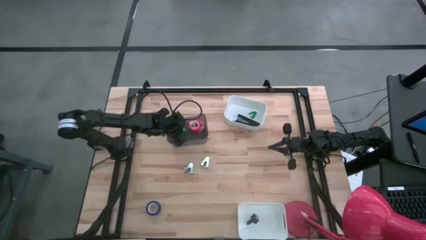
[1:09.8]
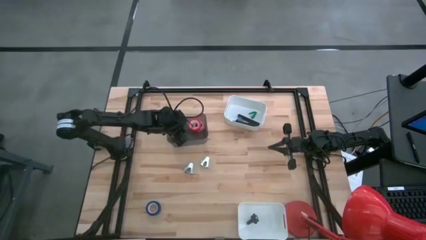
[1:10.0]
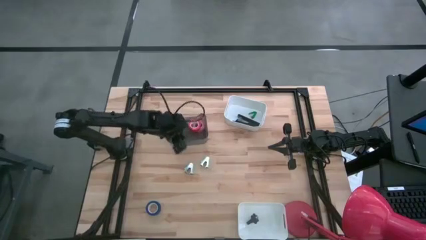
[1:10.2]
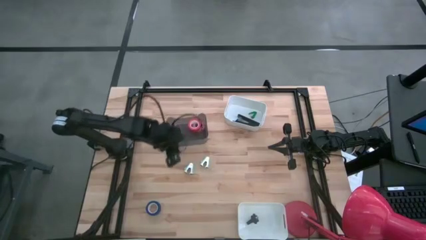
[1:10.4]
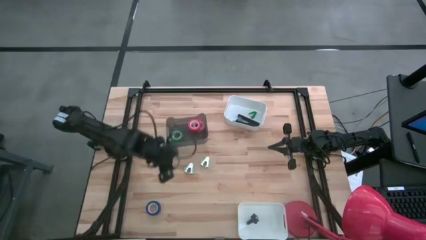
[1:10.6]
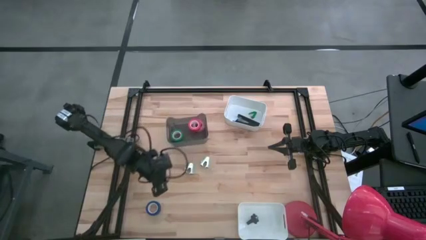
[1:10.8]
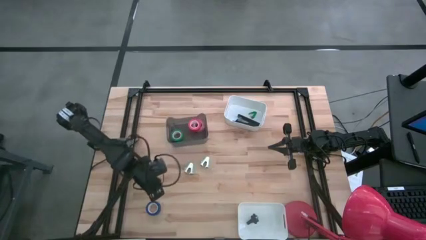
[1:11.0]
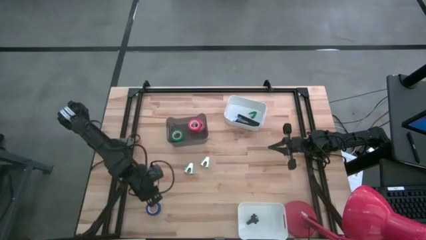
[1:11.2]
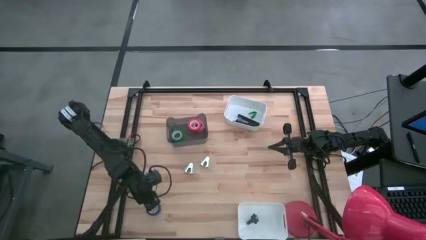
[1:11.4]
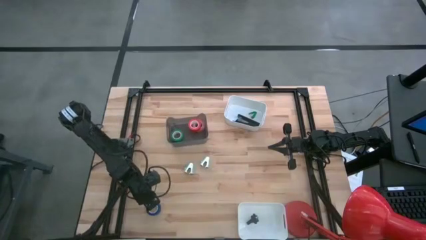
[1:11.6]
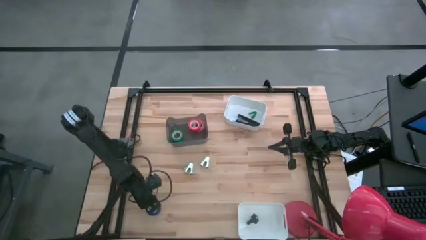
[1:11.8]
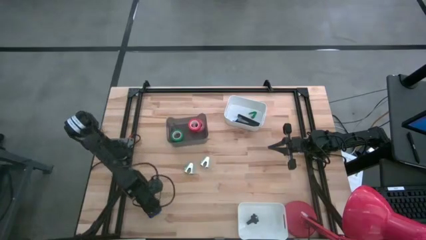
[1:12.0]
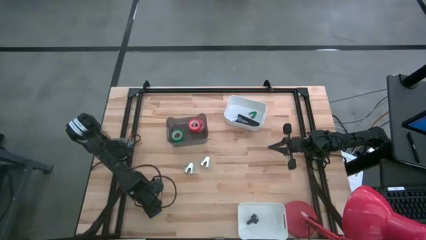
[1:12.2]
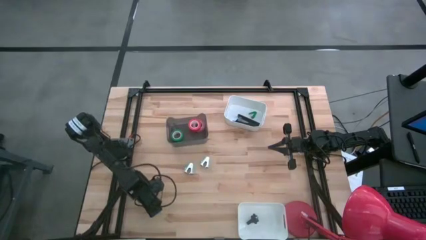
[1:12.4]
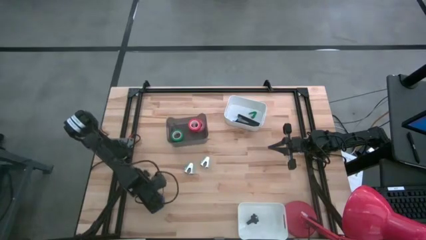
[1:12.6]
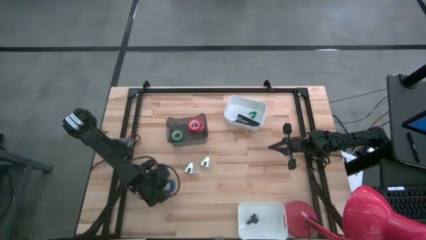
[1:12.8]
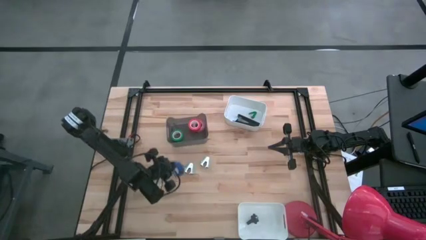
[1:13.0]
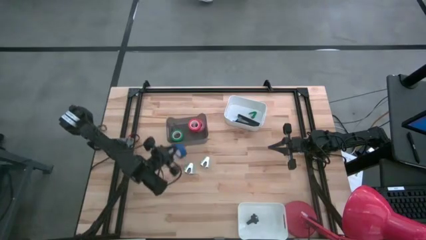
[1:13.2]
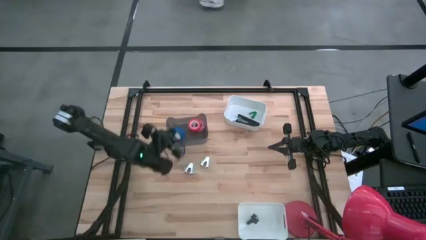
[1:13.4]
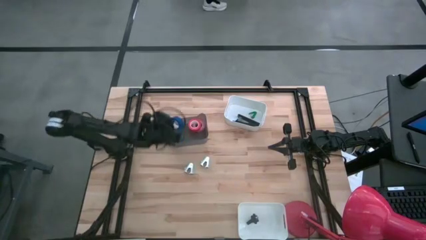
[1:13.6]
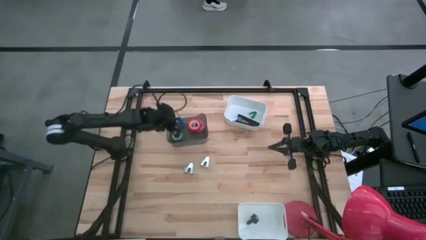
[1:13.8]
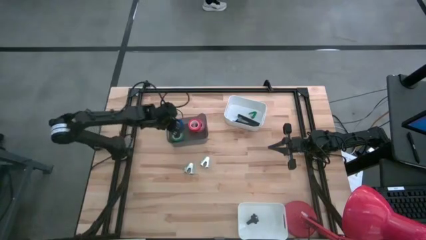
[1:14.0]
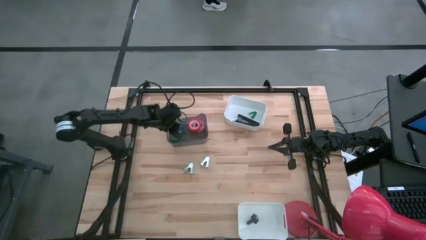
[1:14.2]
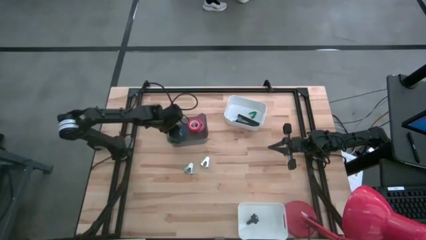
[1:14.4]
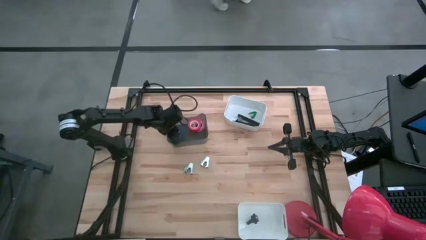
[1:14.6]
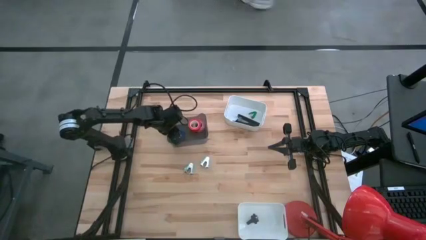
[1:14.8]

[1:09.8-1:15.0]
Task: Pick and place Stapler, Stapler remover, tape
Put the blue tape into the black bin

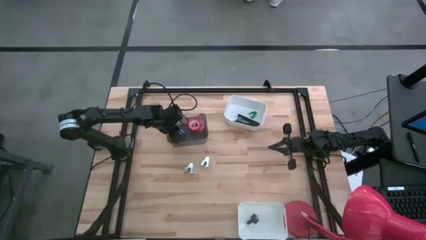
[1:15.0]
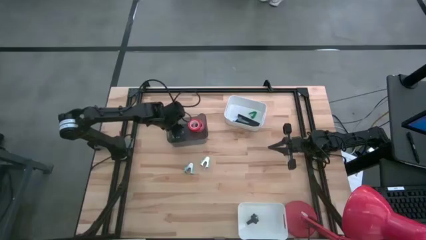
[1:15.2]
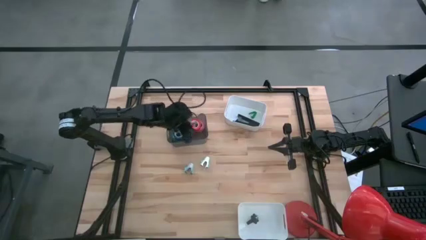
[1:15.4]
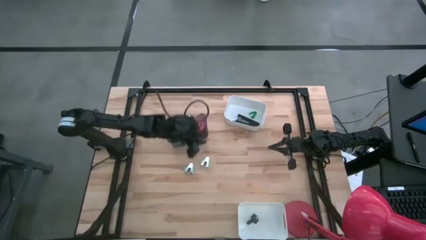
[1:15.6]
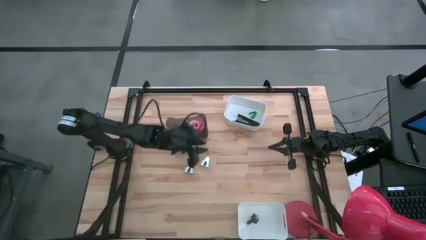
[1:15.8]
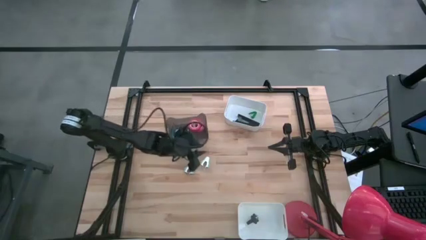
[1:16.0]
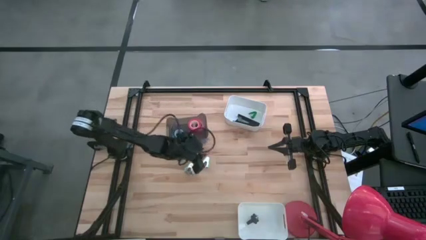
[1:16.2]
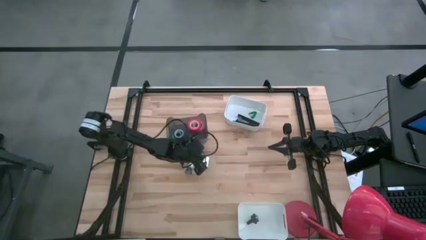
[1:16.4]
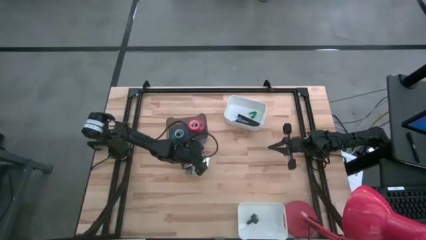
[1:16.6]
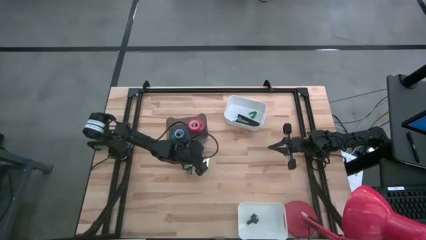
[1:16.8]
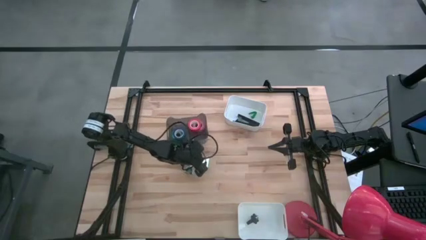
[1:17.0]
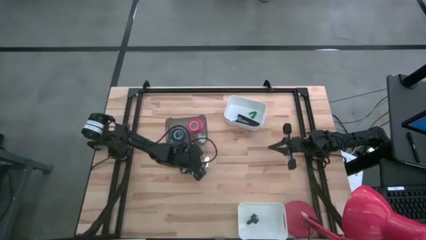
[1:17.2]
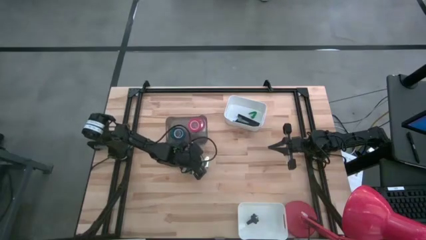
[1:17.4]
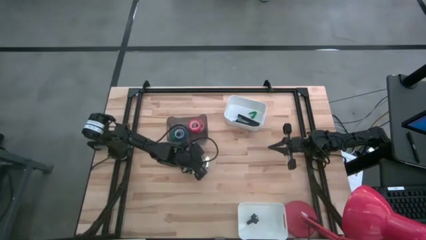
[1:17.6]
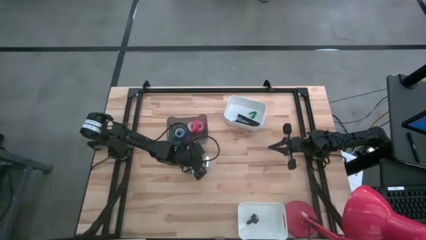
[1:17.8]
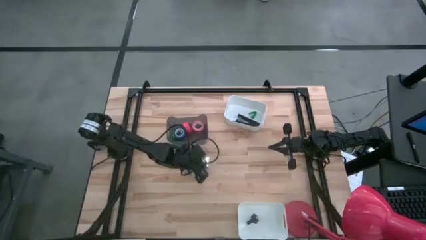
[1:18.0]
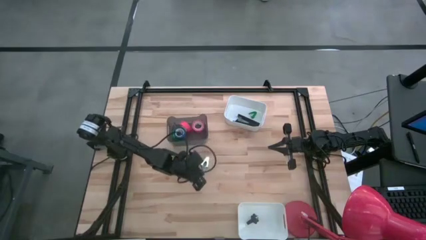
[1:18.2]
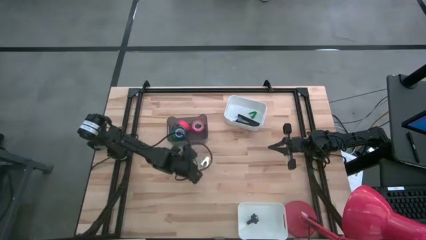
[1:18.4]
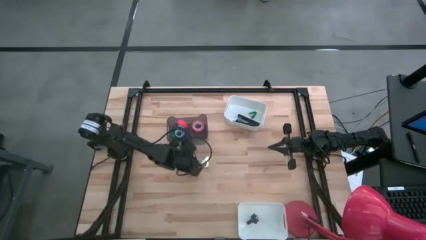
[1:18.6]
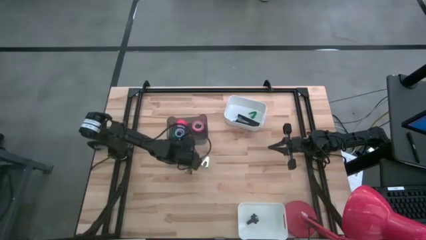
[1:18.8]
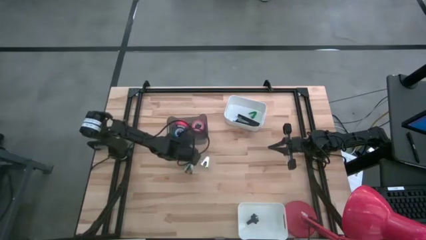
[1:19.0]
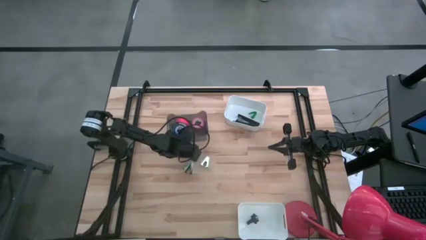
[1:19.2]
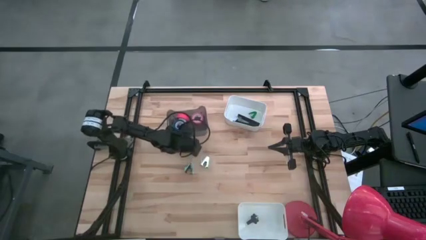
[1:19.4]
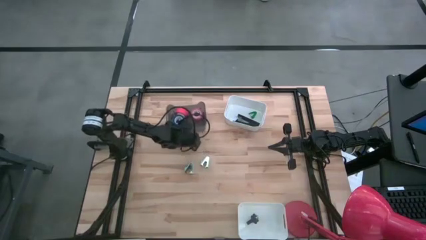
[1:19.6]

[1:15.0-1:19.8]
Adjust the black bin on the table

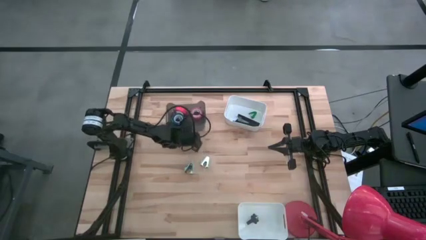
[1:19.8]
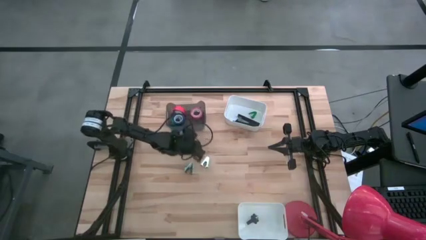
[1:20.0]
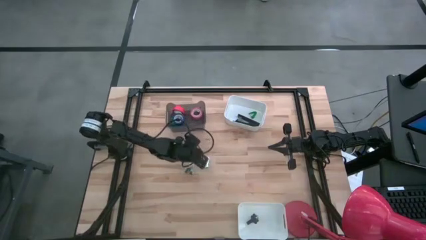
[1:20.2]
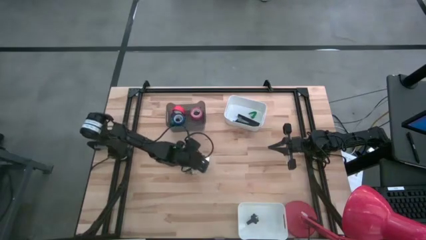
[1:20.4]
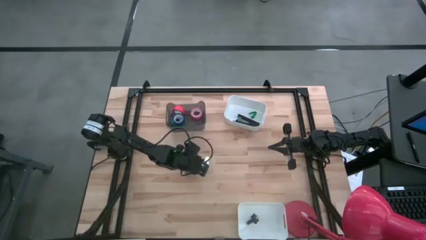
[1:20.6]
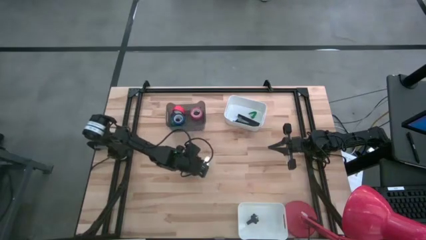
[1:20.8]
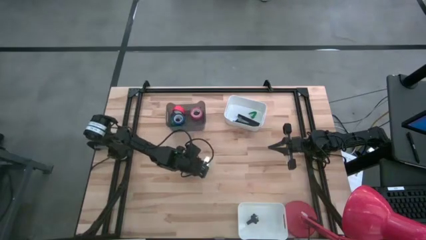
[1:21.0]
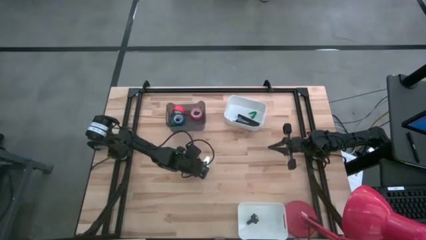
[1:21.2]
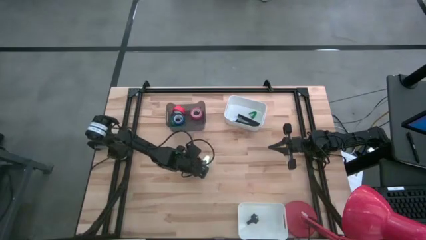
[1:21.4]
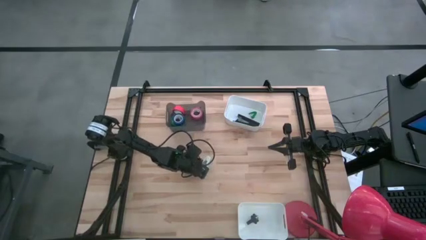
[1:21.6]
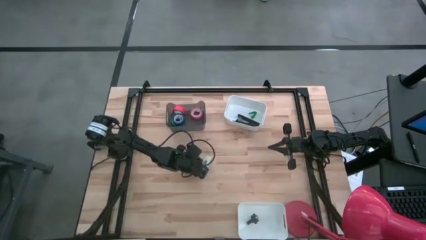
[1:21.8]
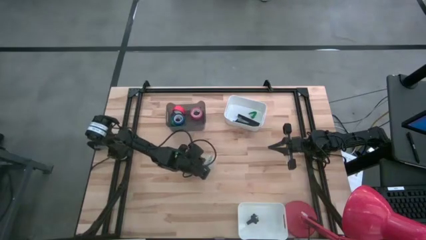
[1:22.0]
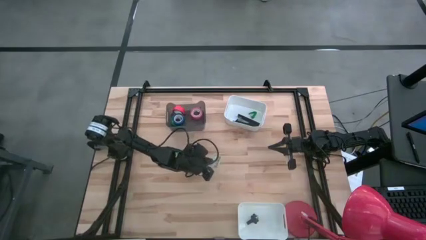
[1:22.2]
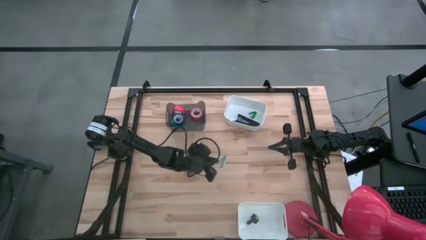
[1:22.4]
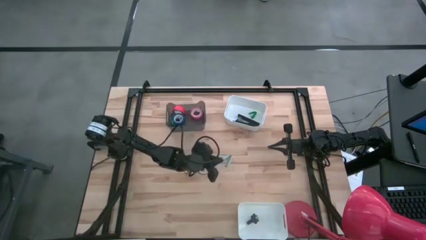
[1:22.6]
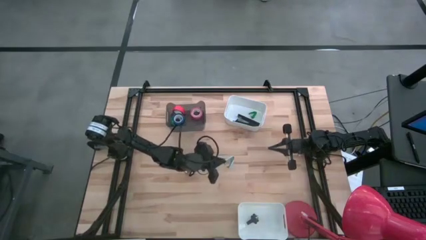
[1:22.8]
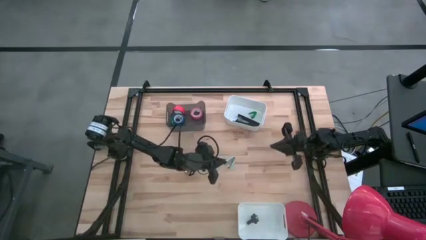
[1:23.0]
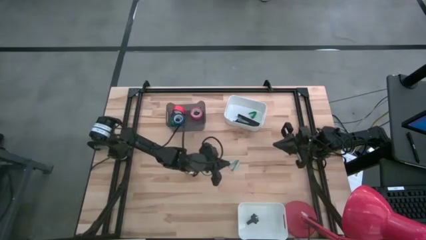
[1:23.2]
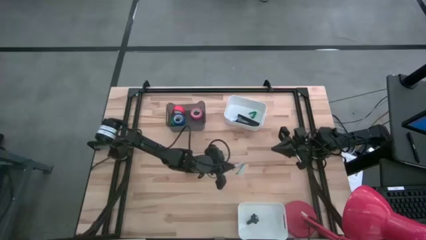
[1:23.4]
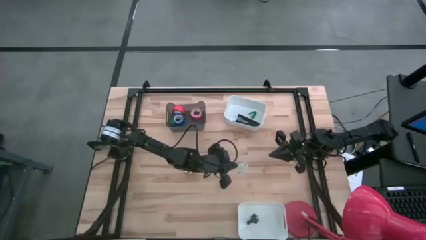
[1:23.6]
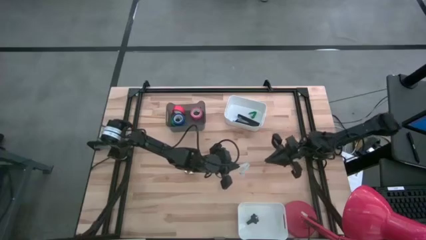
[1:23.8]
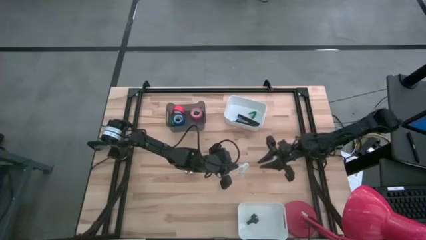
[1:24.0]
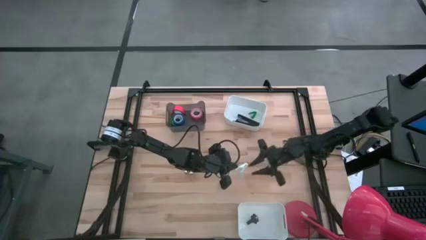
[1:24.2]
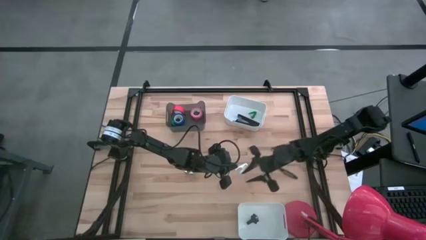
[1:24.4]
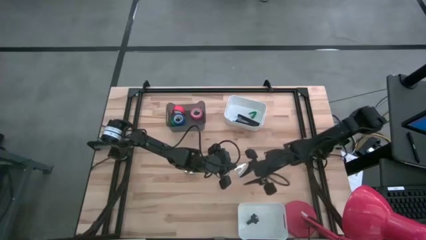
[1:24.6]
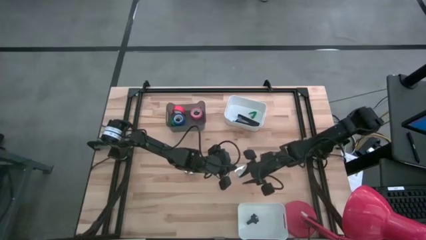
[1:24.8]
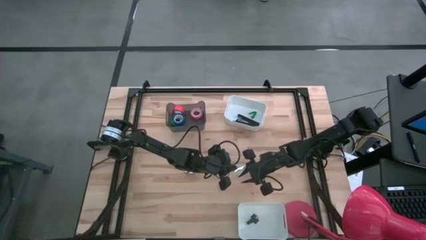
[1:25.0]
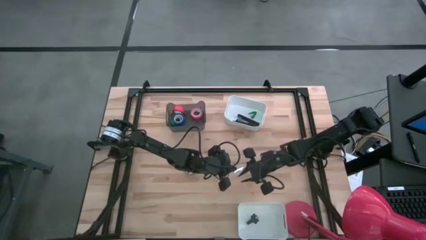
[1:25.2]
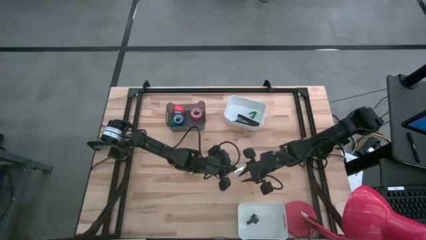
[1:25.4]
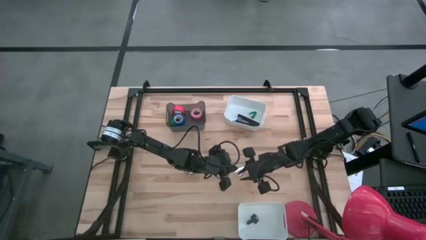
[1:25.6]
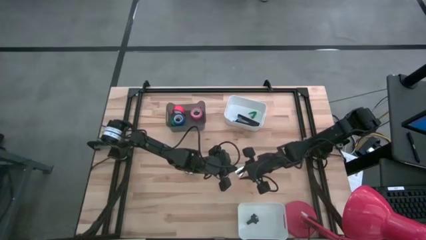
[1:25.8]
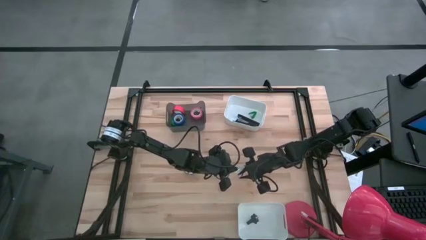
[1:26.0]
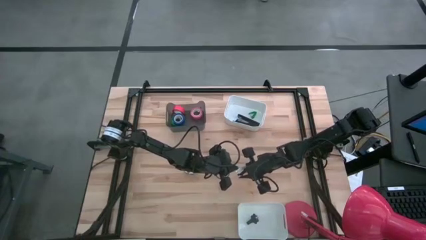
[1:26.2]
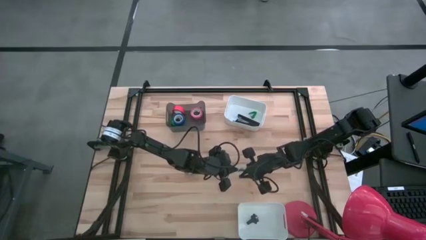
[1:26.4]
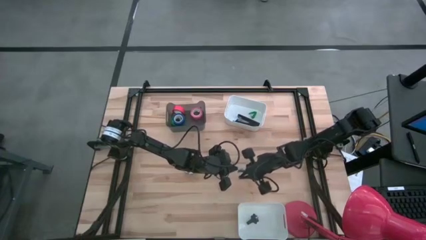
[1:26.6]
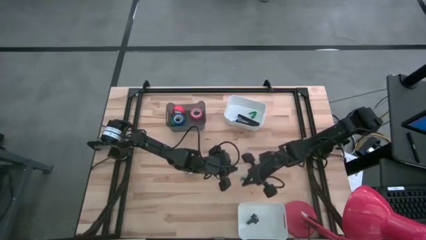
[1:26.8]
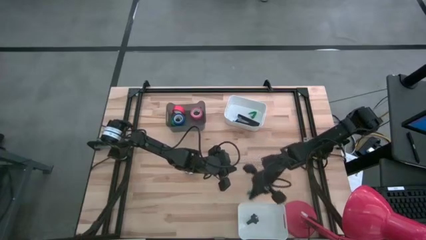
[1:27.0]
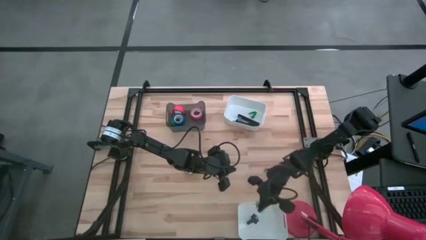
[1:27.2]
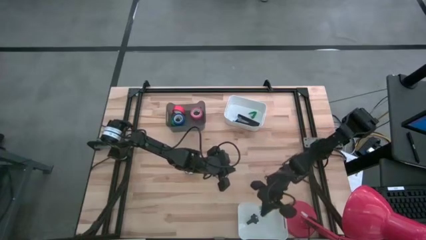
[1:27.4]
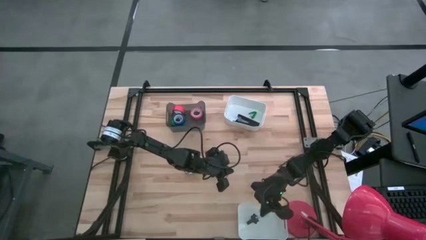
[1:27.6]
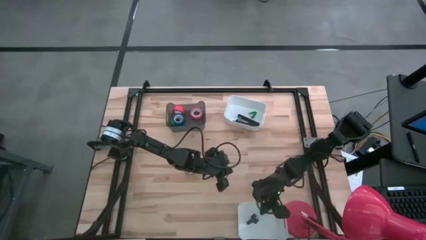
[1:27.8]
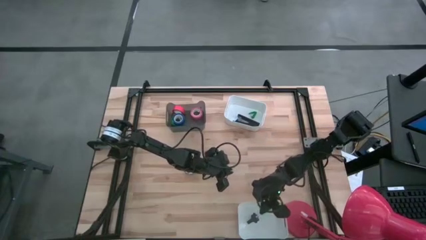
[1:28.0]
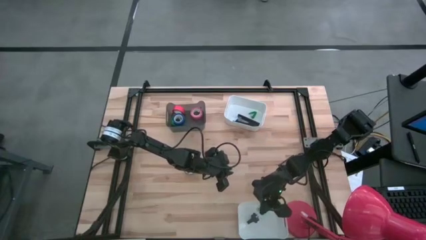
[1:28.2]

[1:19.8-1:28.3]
Put the right blue staple remover into the bottom white bin
